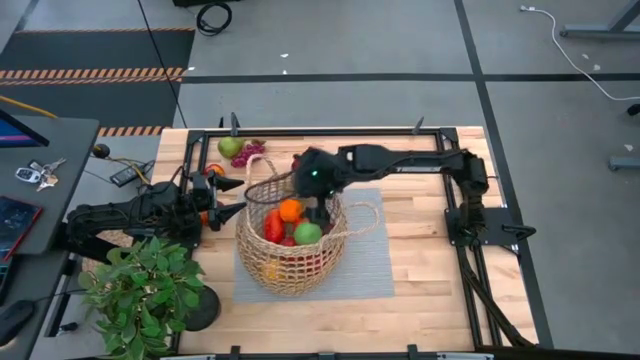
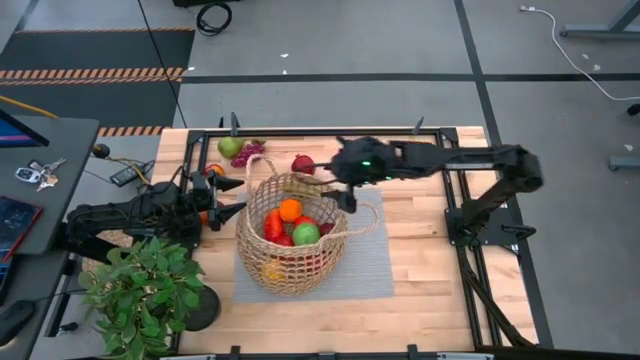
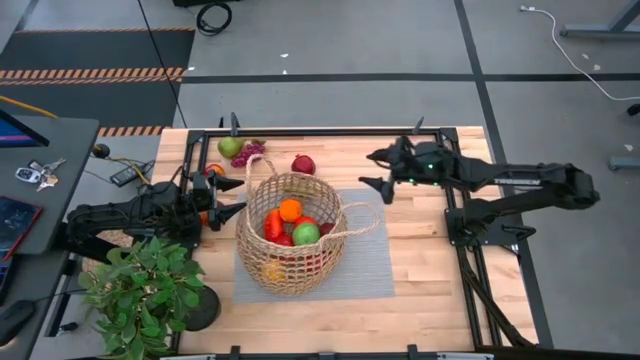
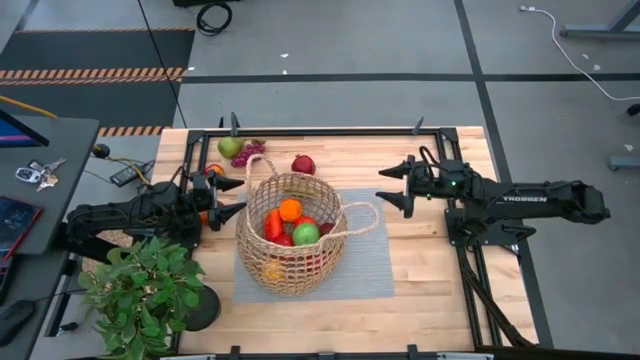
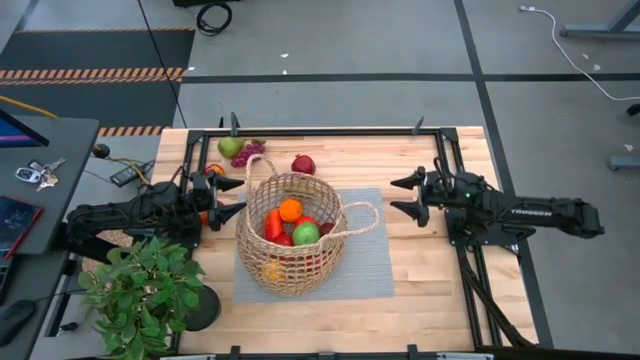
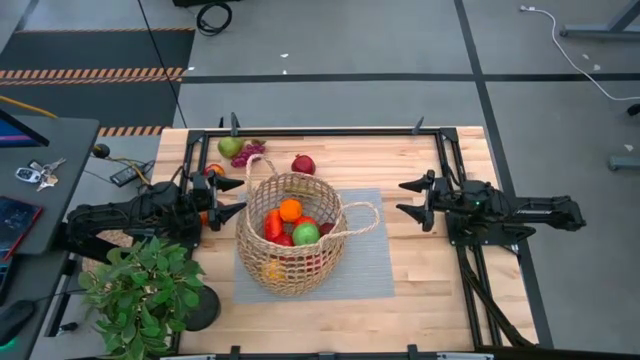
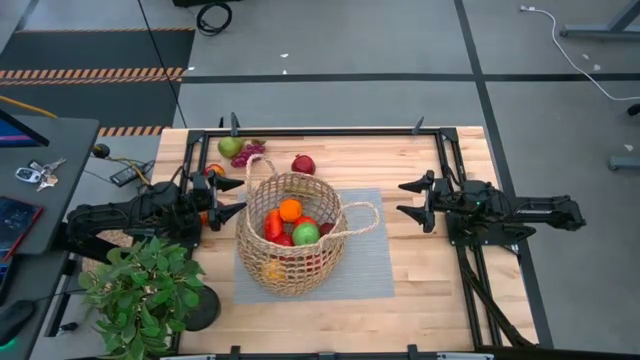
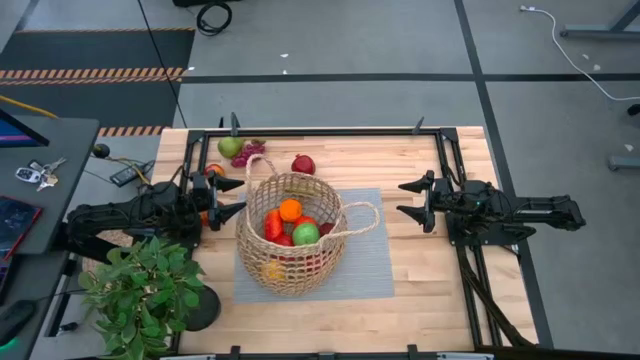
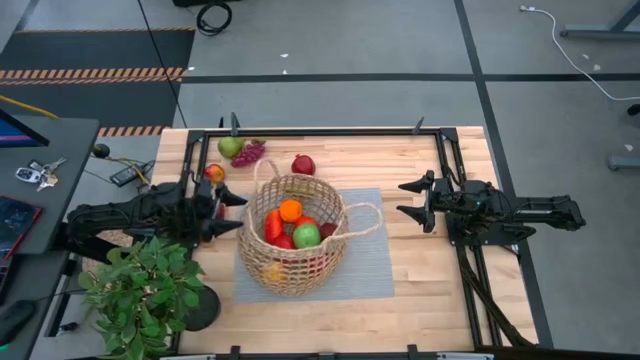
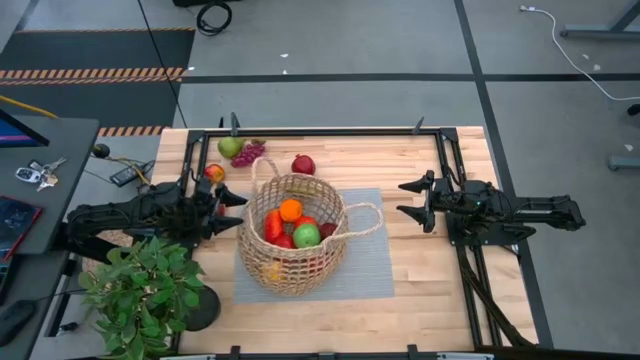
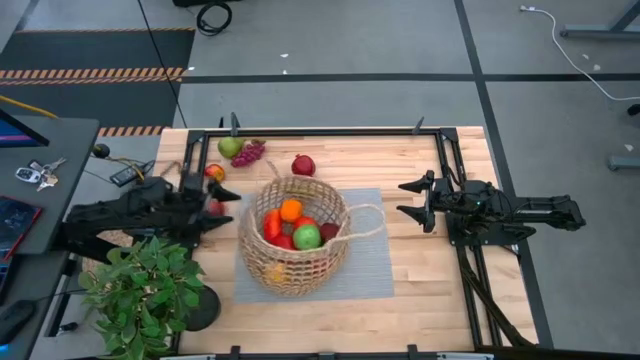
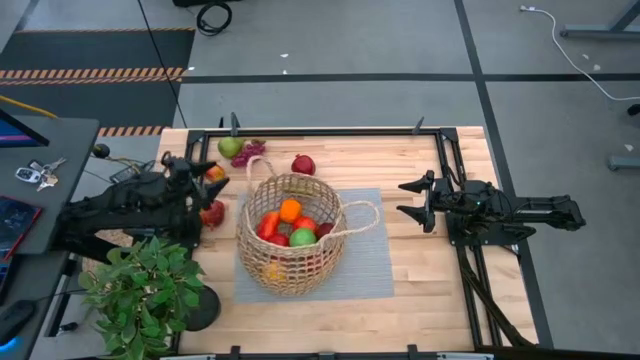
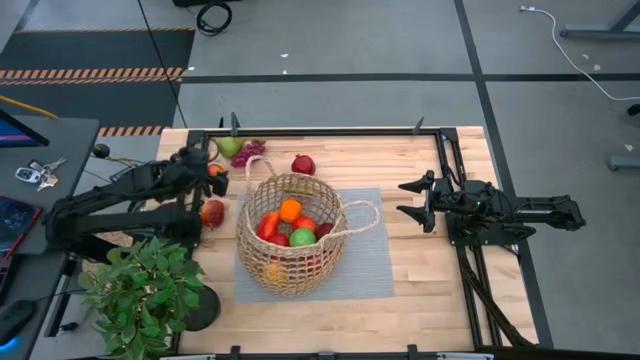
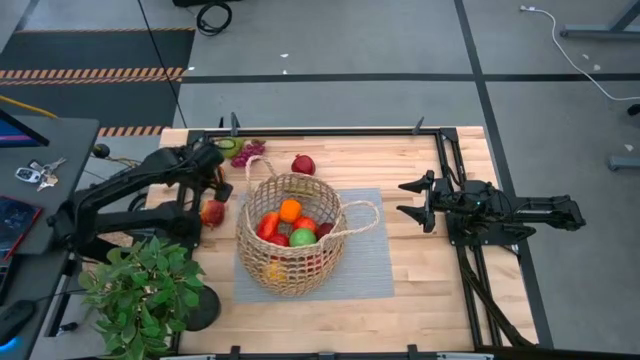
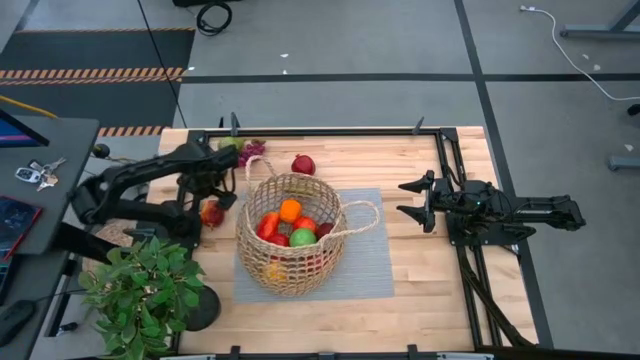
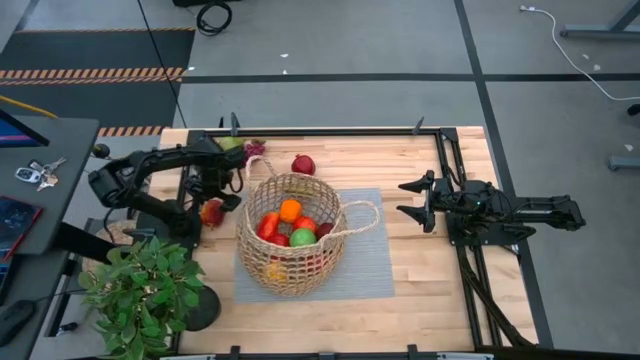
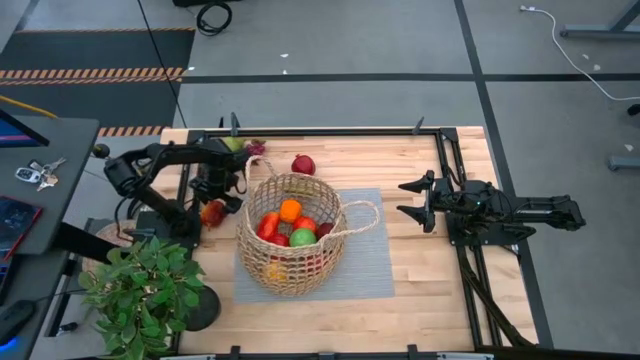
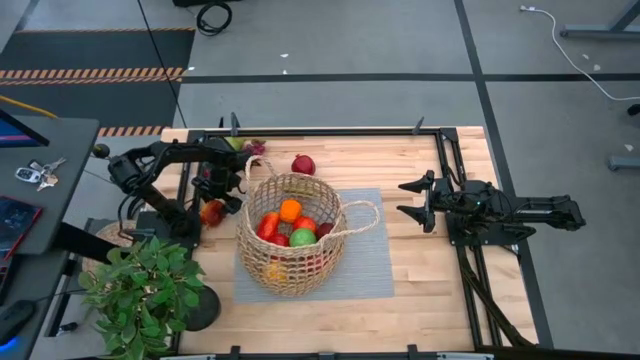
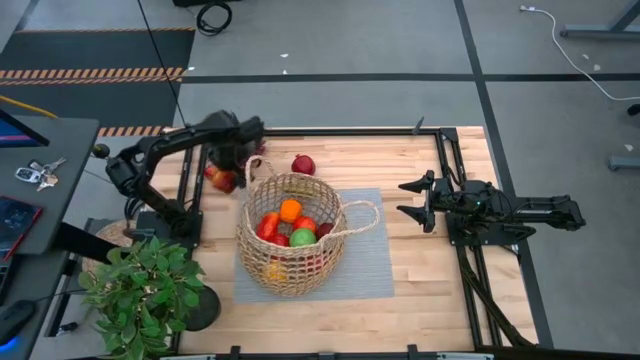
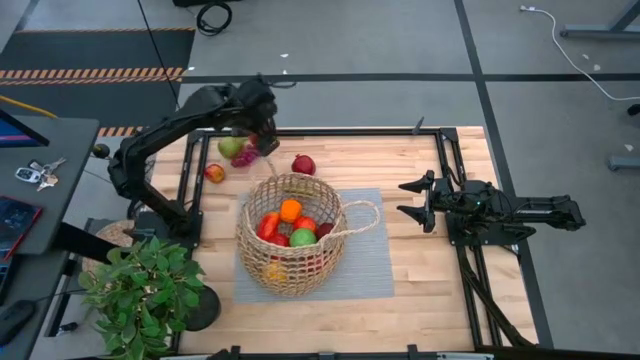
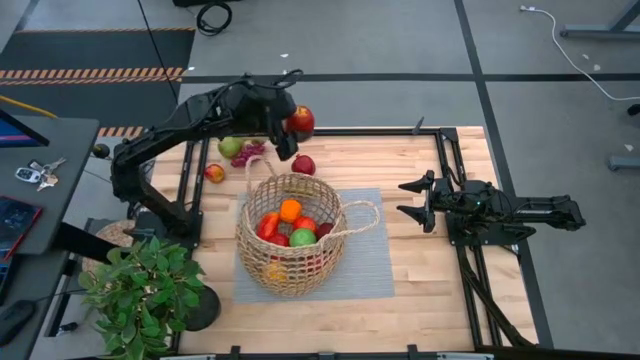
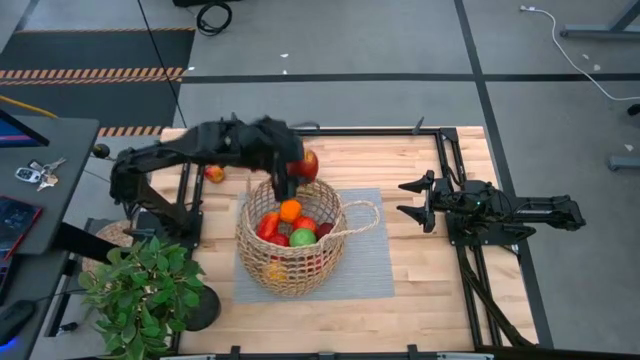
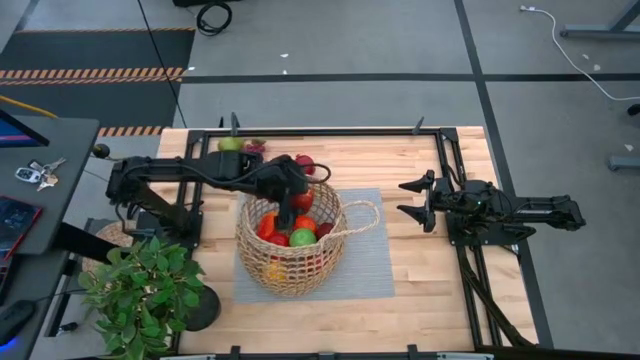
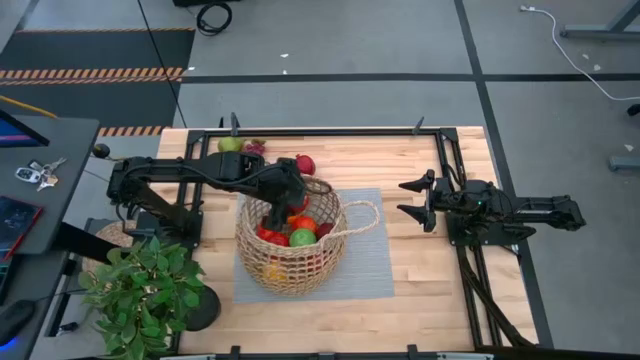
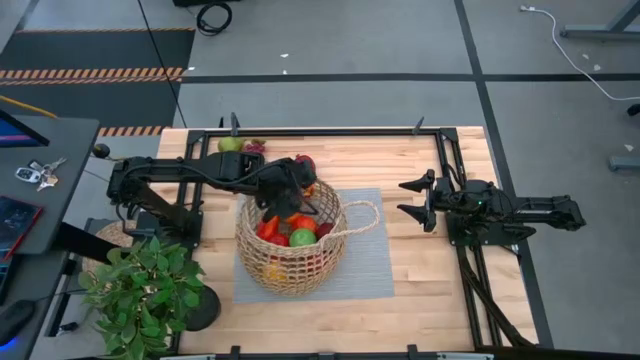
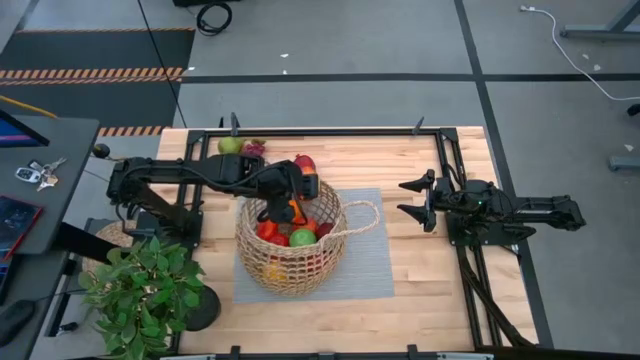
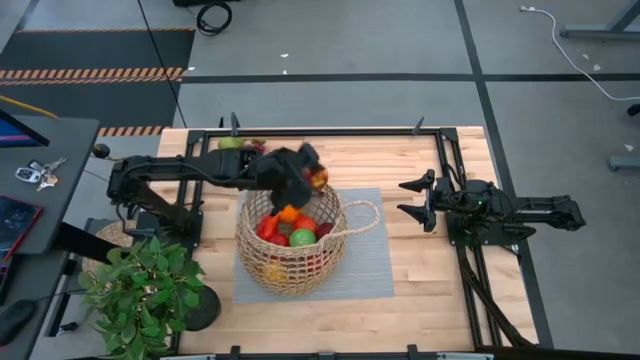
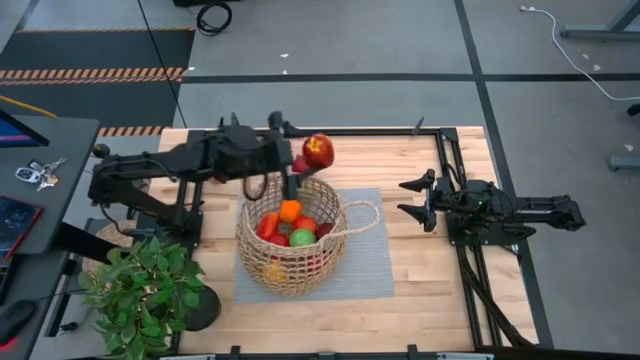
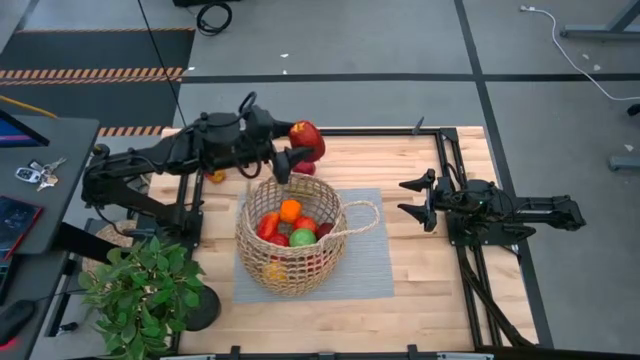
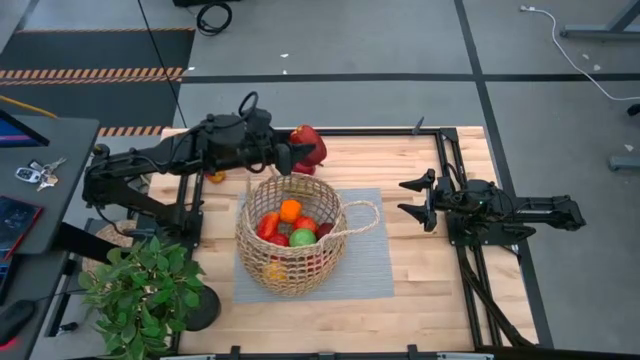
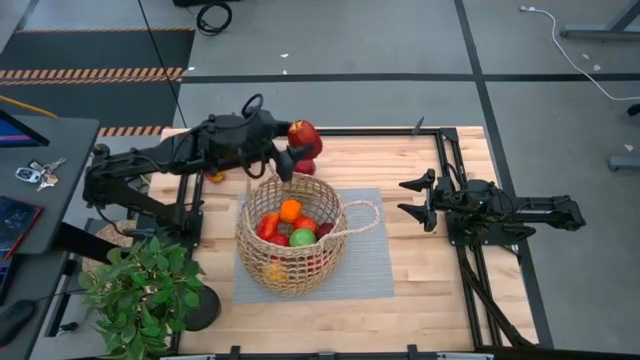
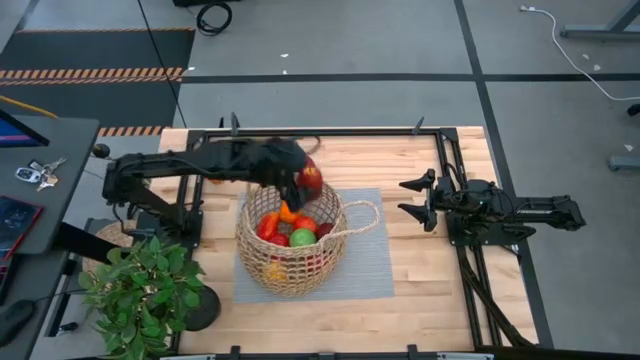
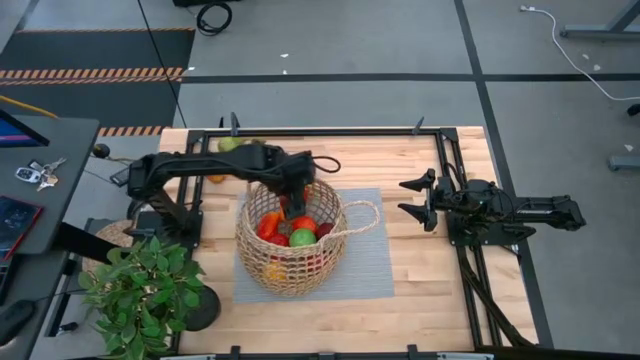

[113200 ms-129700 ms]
Task: Build produce basket
Put the red apple into the brown woven basket

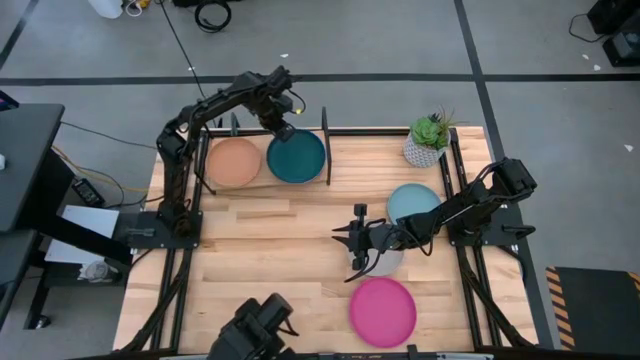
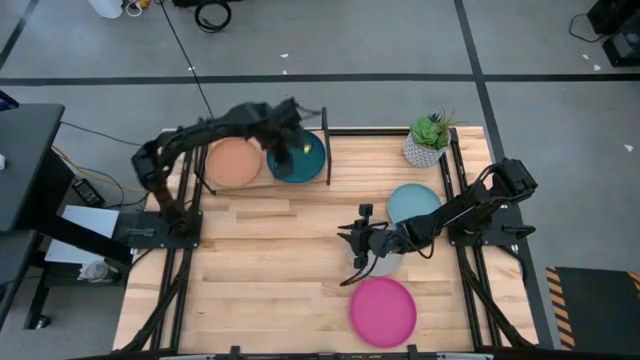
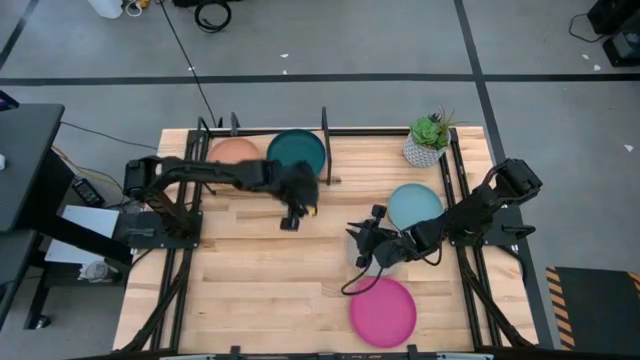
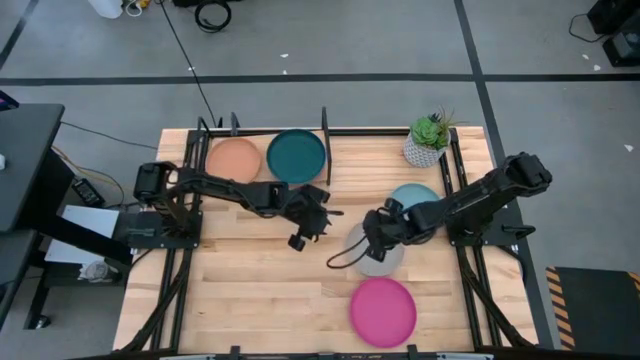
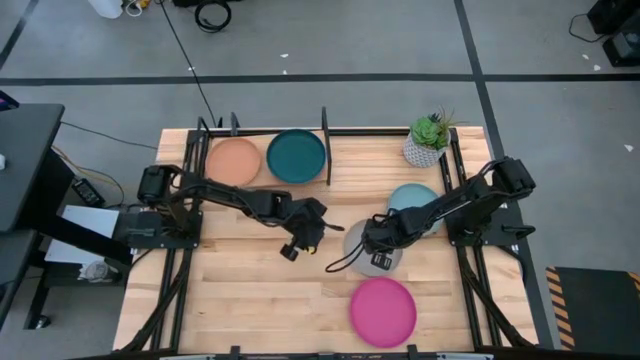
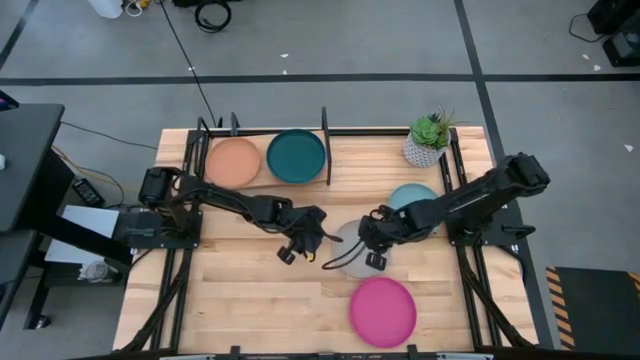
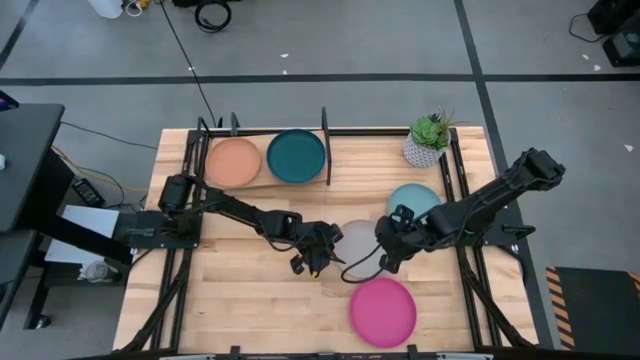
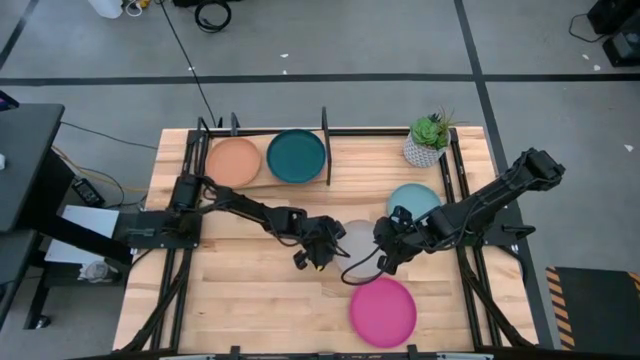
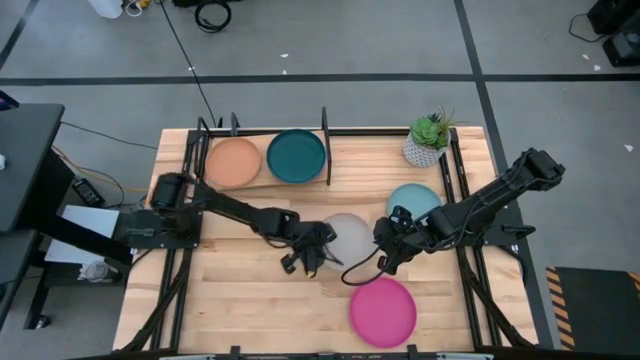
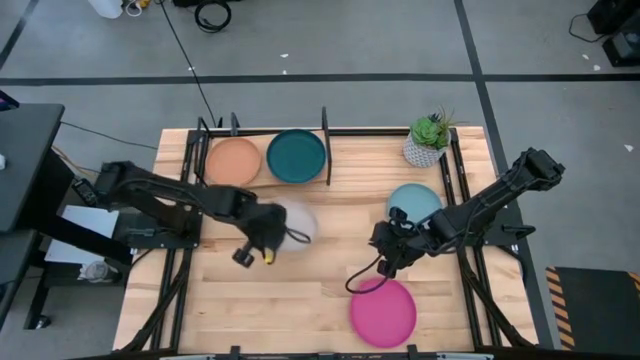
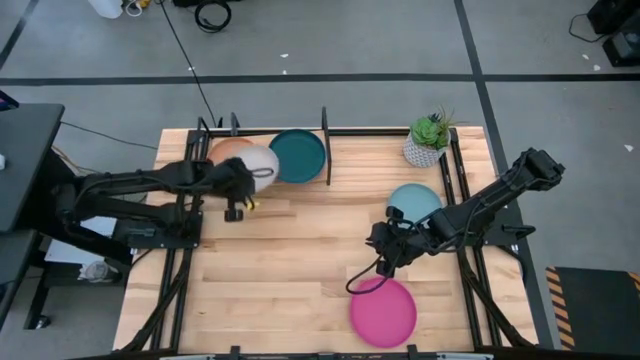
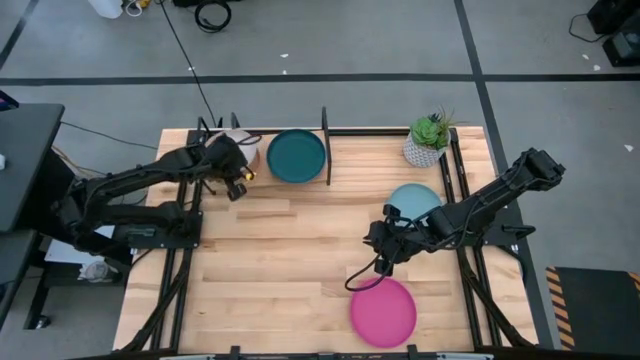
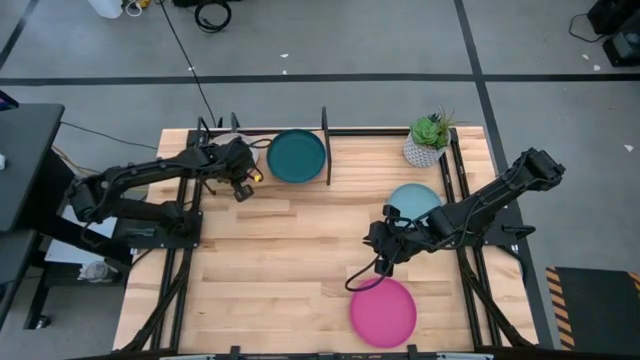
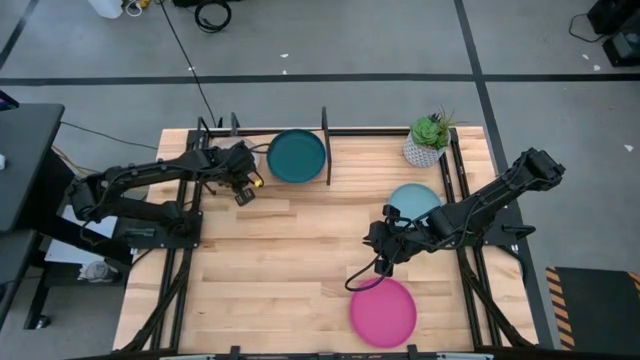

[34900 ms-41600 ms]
Task: Place and stack plates onto a shelf
Stack the gray plate on the light brown plate
